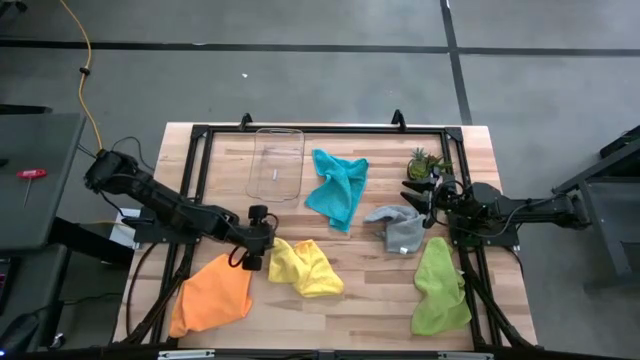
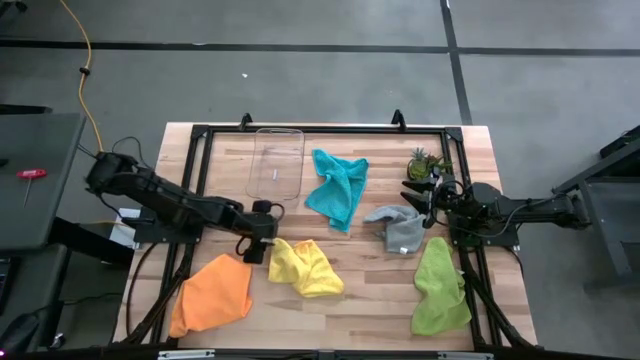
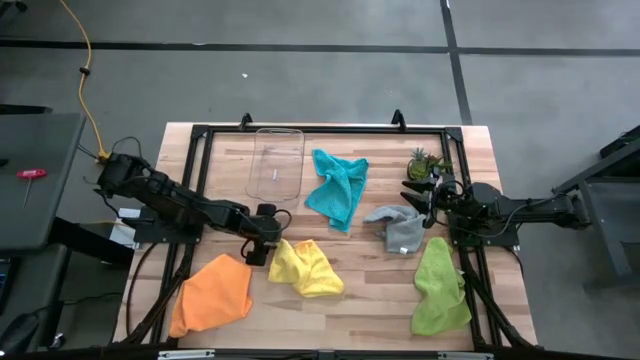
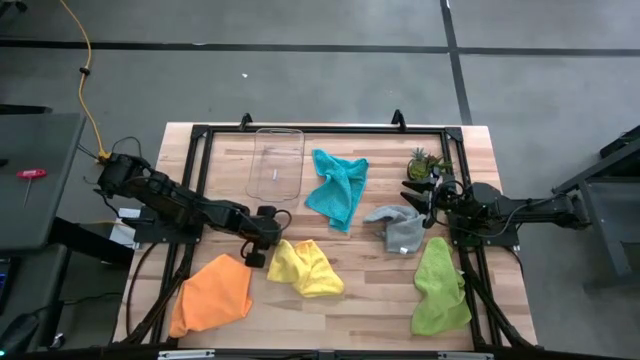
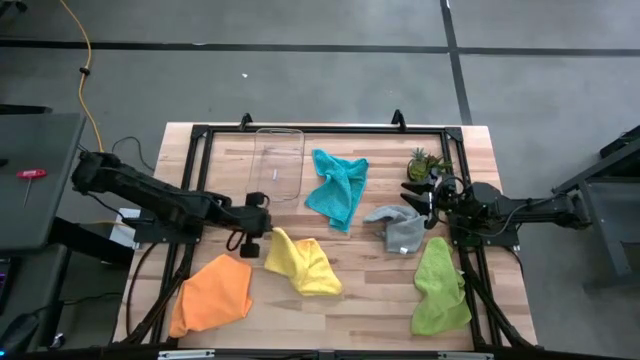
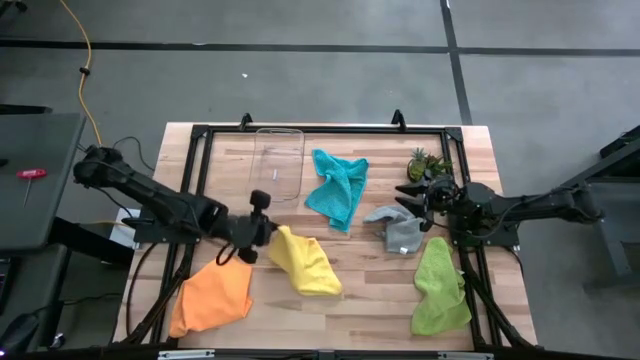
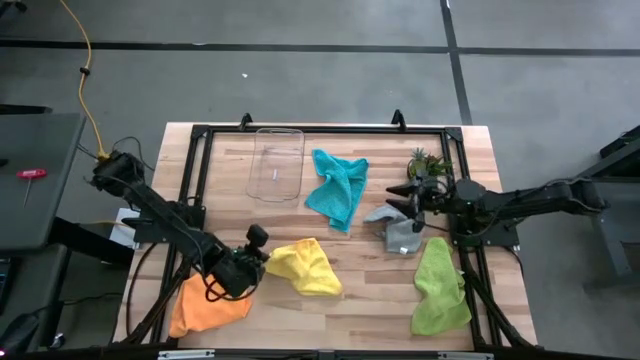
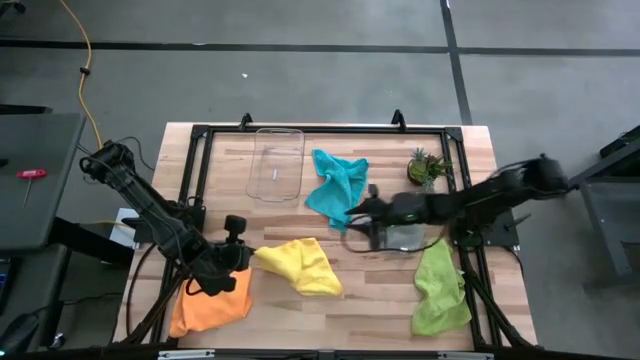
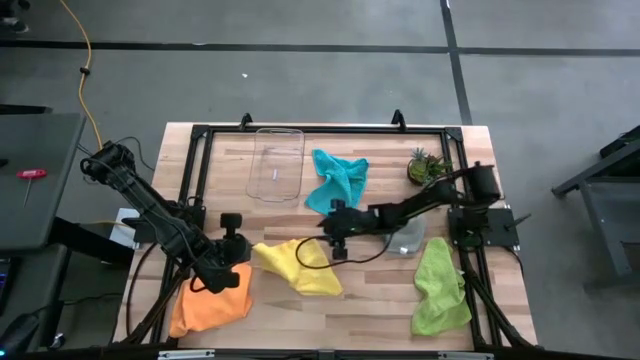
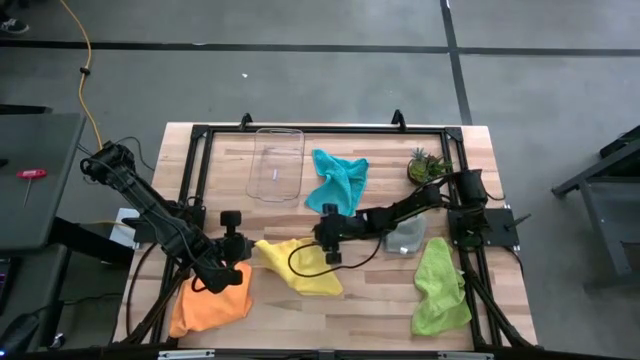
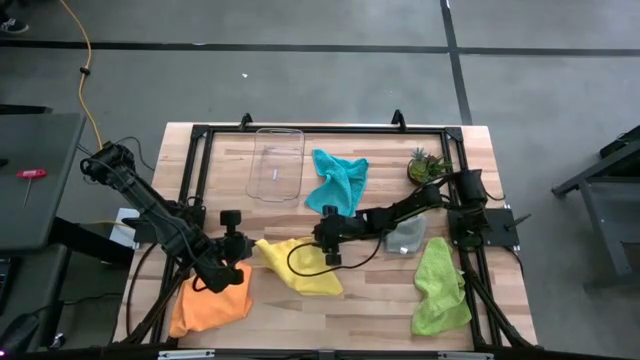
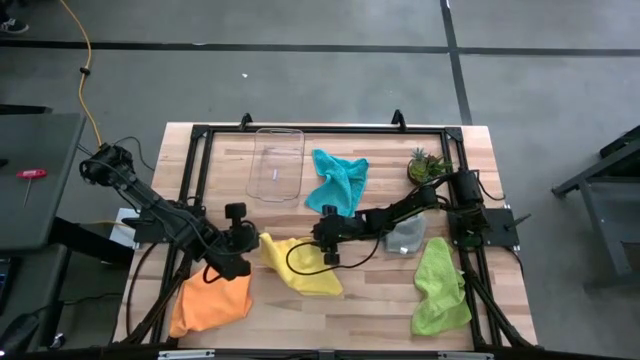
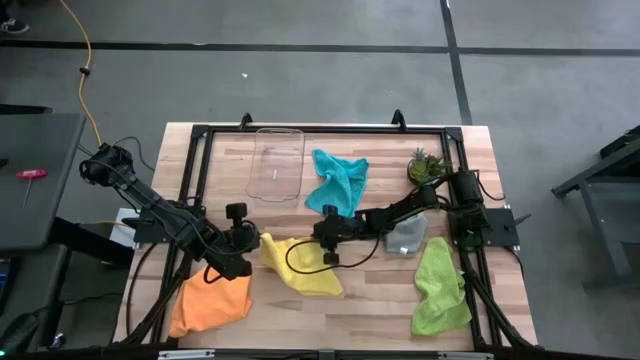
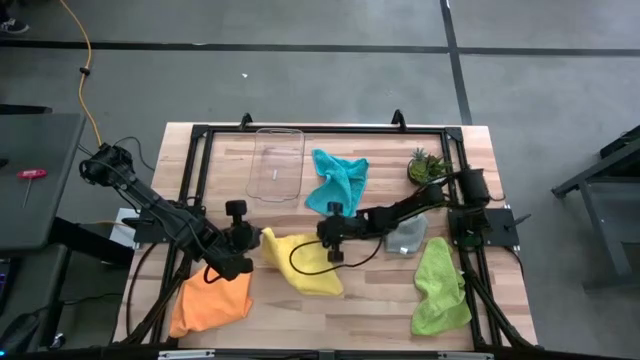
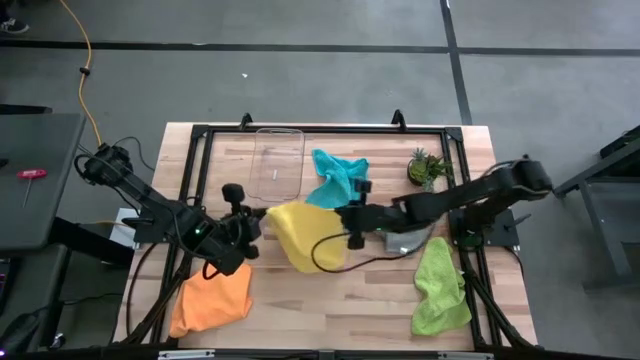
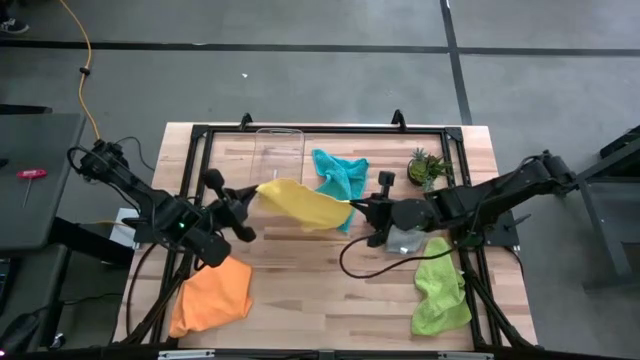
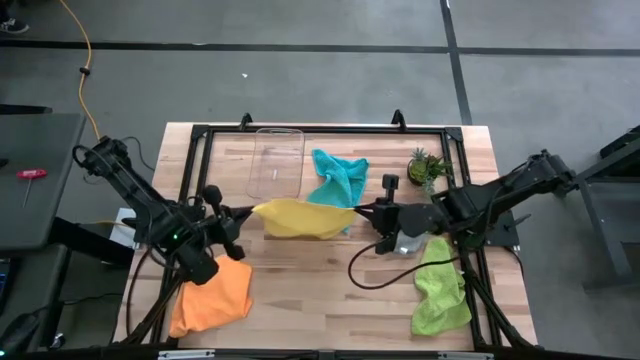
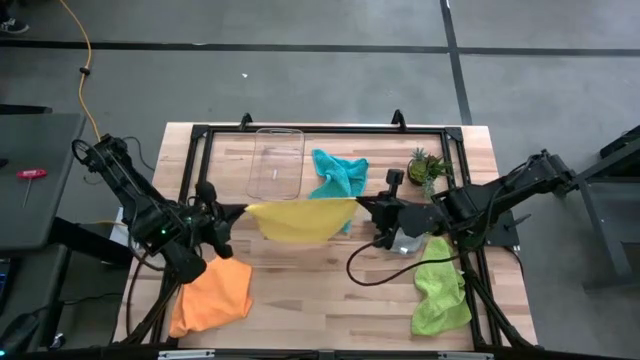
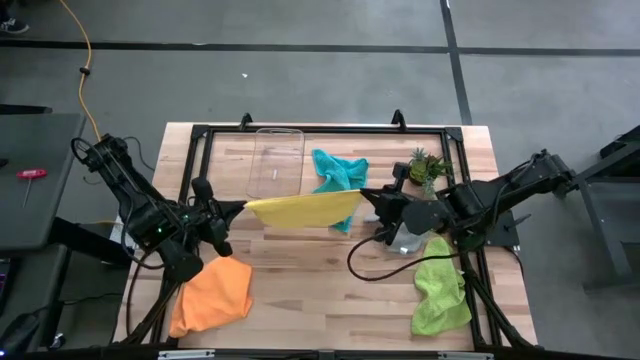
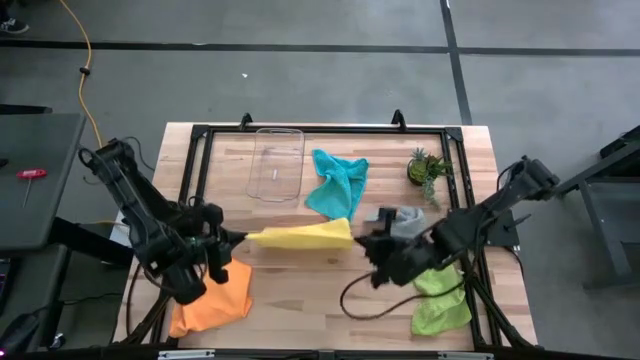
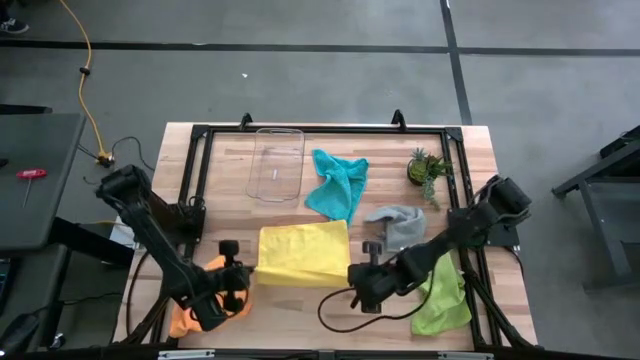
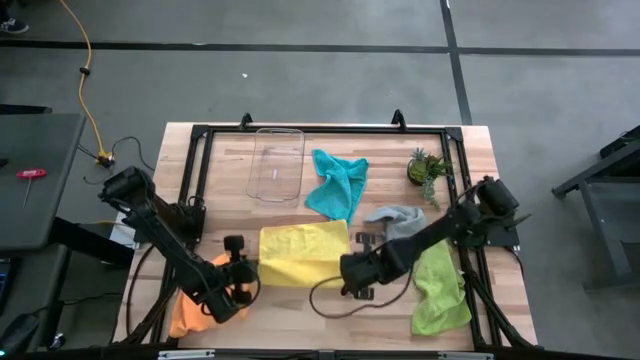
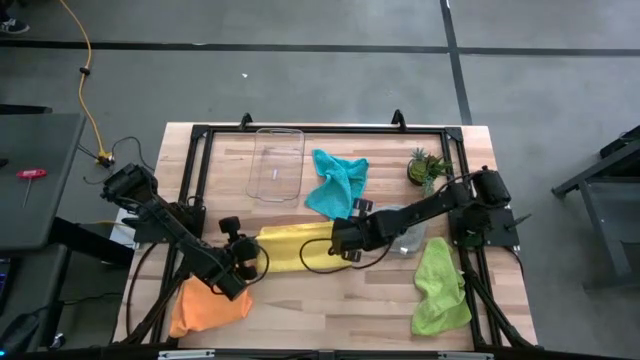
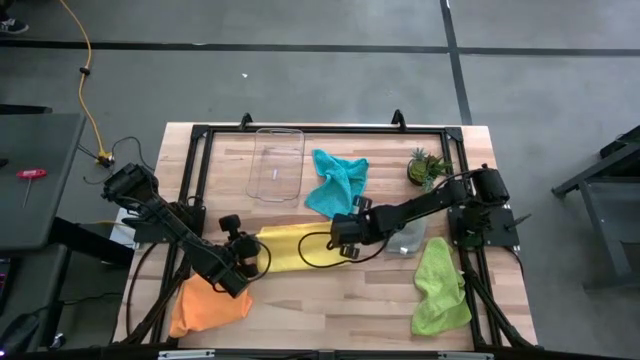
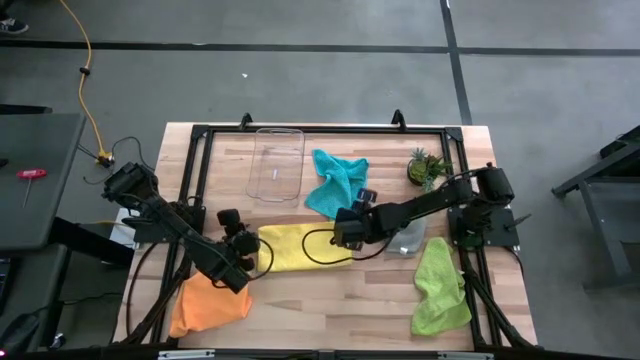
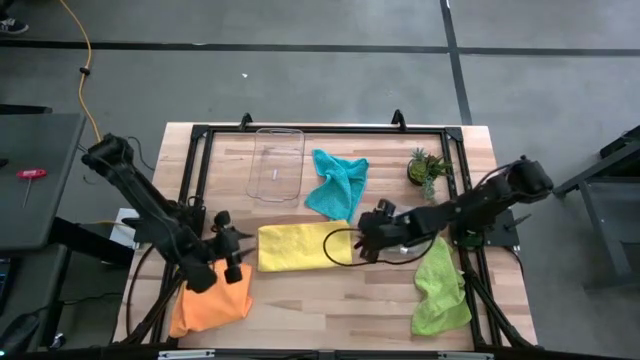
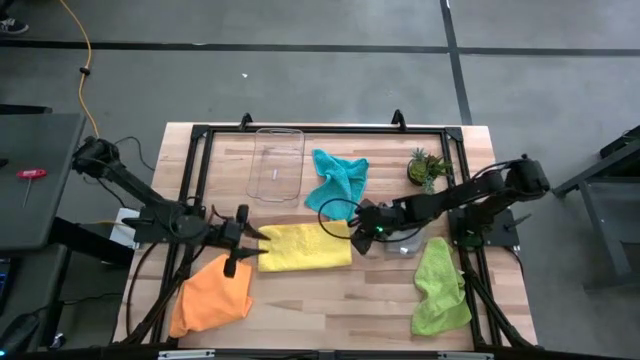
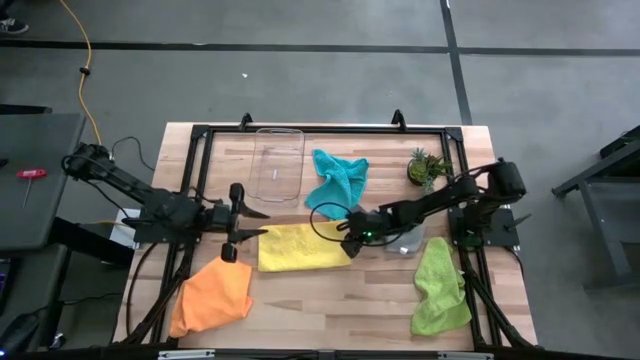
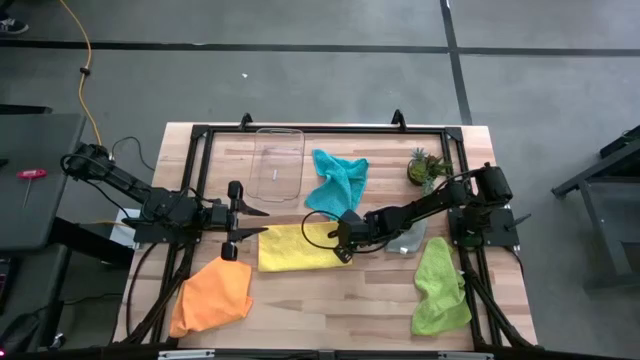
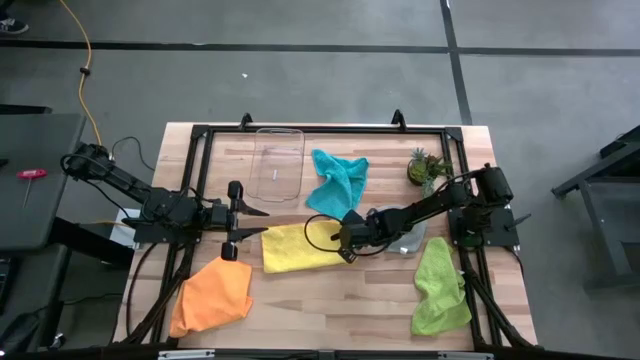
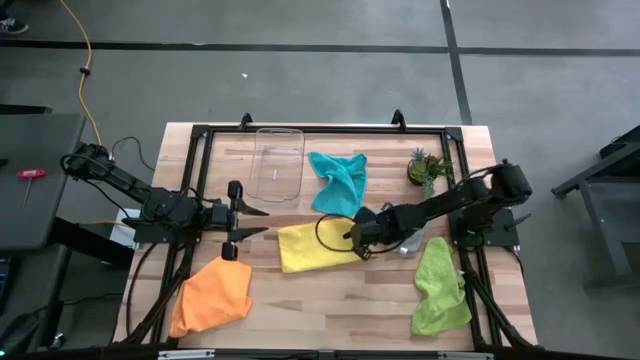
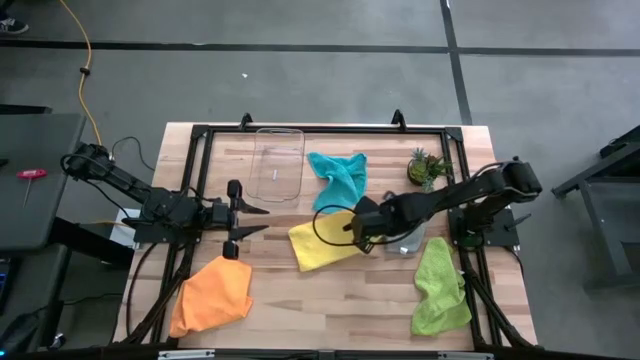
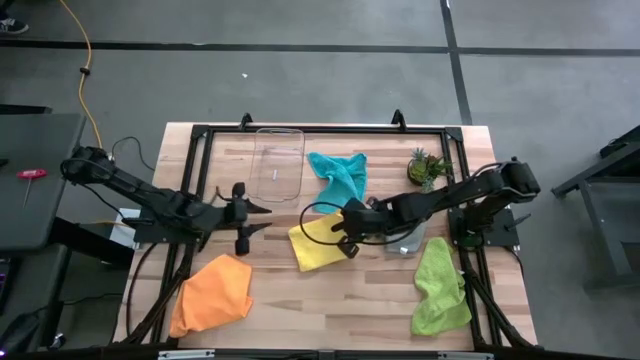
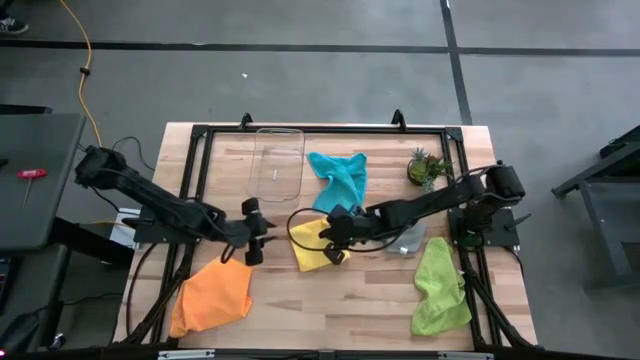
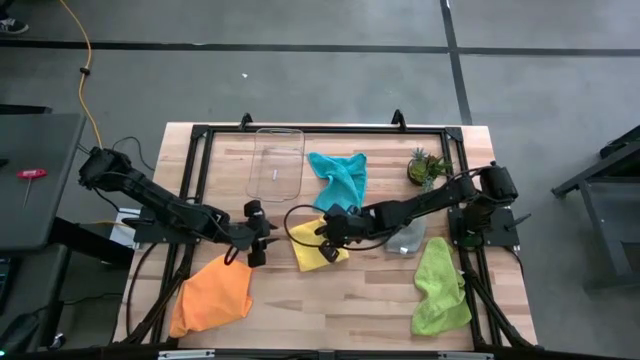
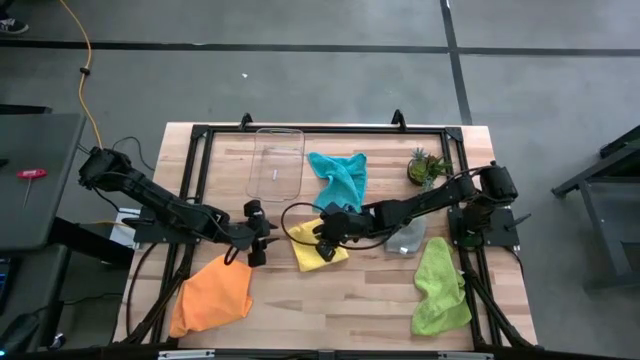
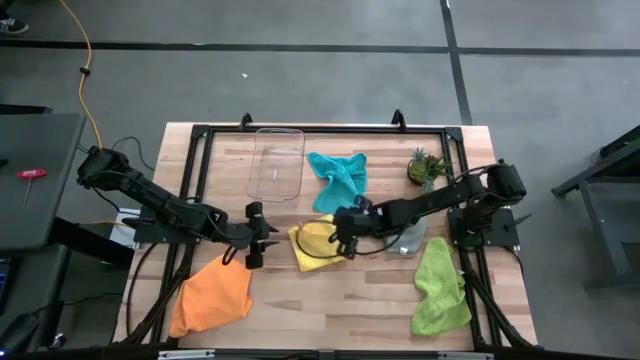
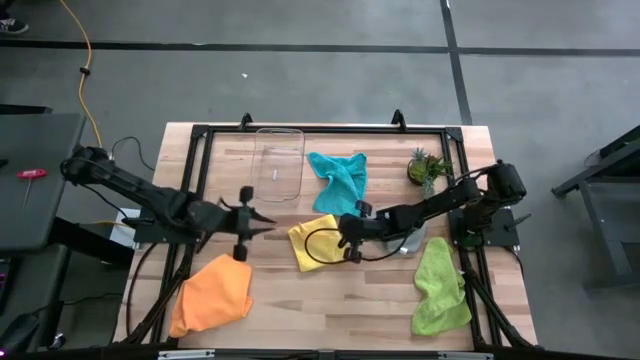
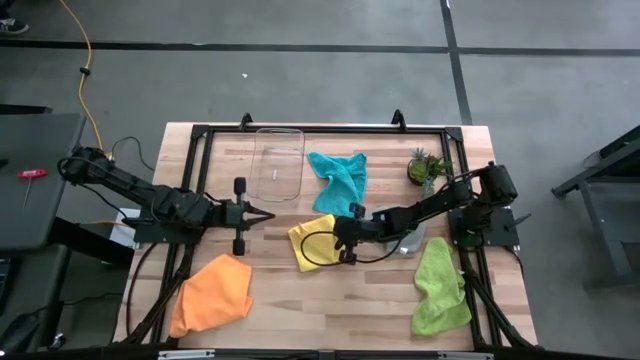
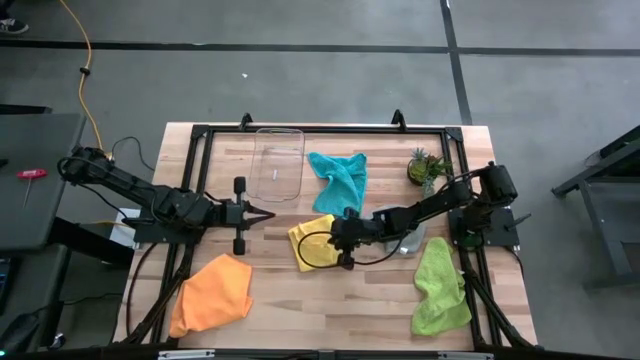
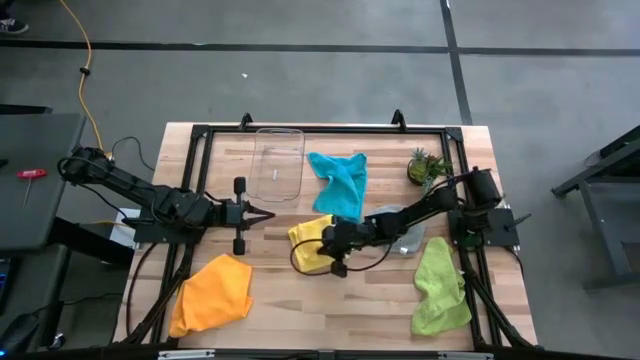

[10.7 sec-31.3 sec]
Task: Fold microfiber towels
Fold the yellow microfiber cloth
